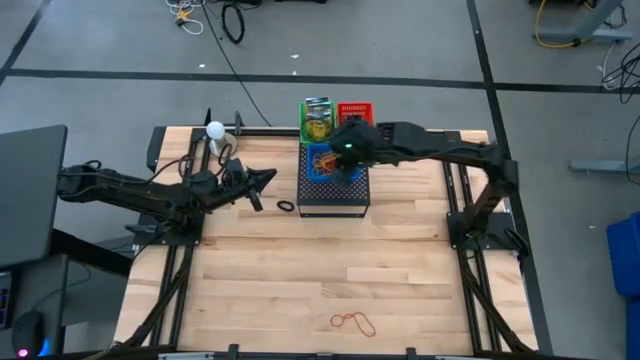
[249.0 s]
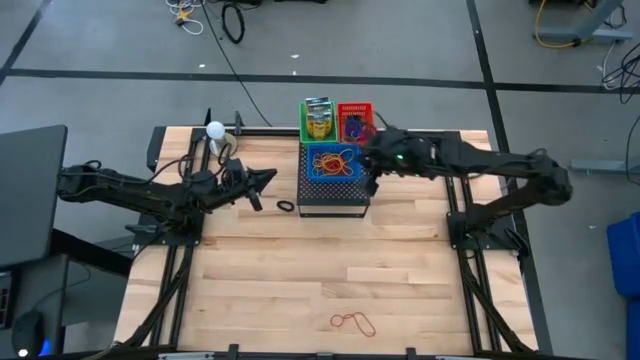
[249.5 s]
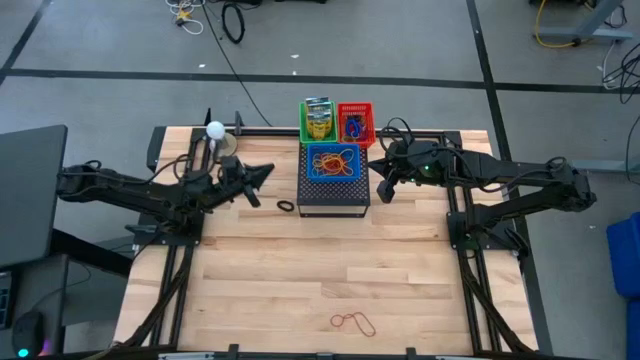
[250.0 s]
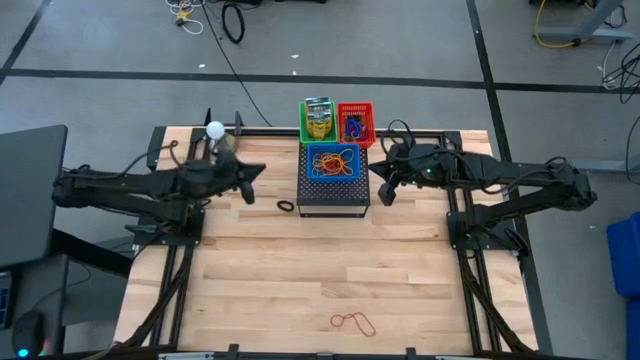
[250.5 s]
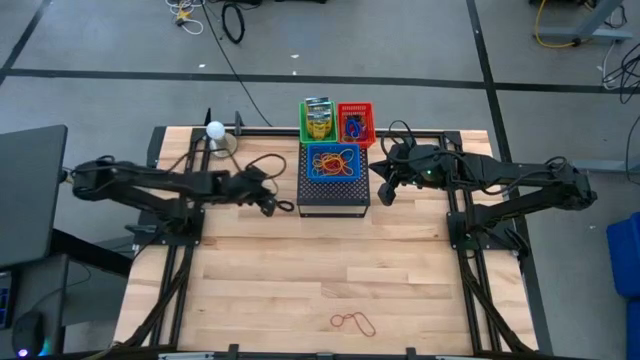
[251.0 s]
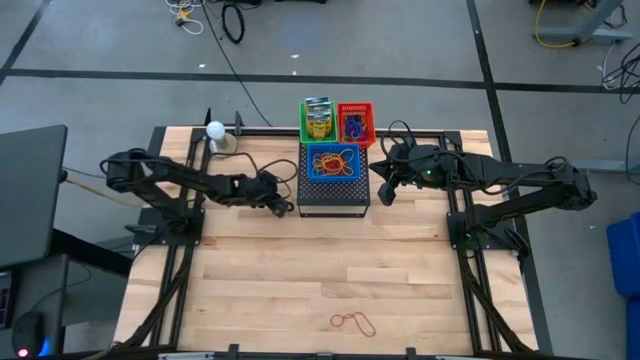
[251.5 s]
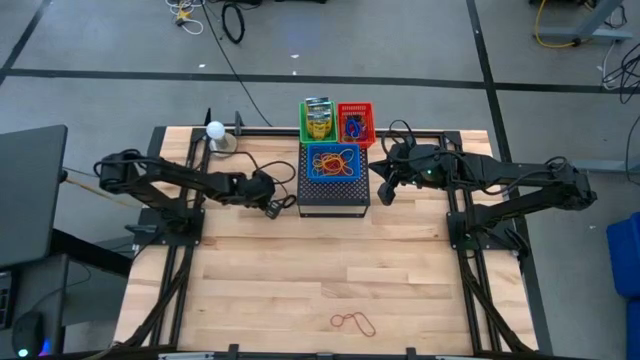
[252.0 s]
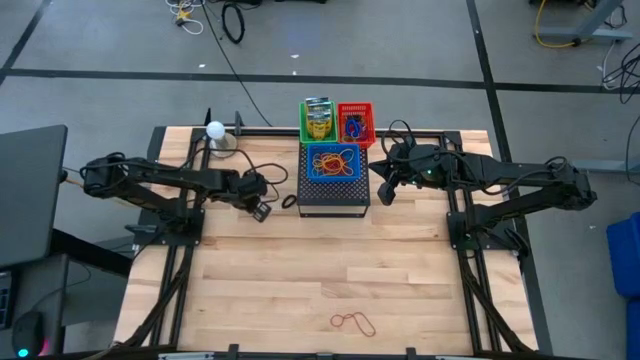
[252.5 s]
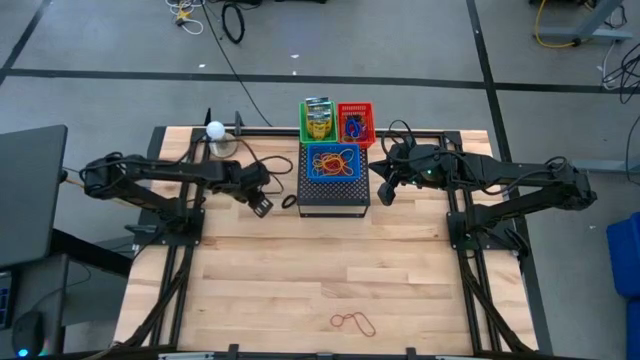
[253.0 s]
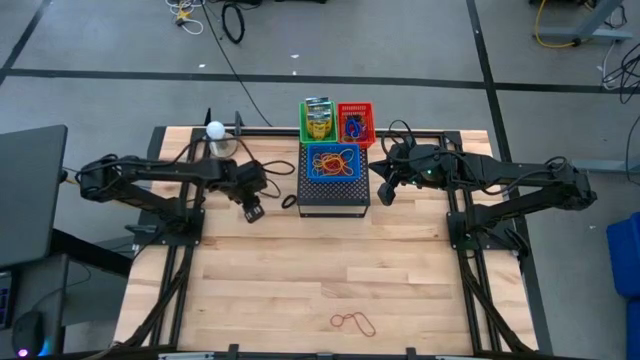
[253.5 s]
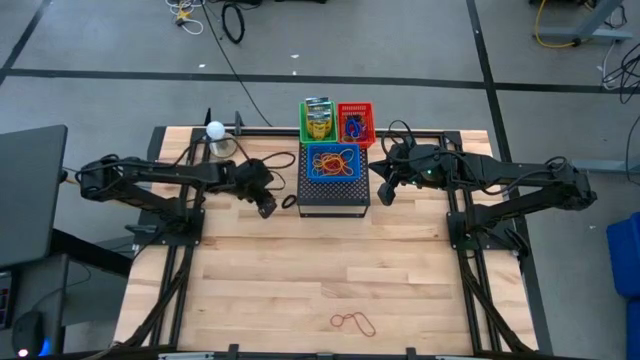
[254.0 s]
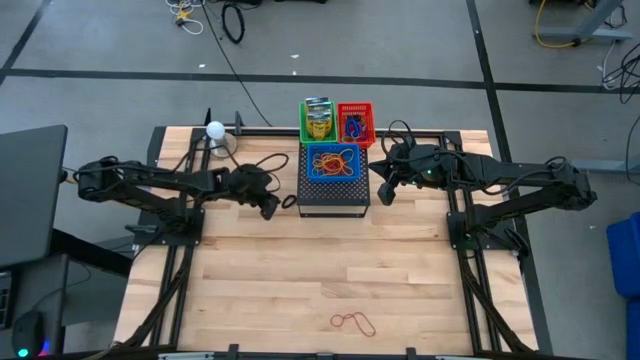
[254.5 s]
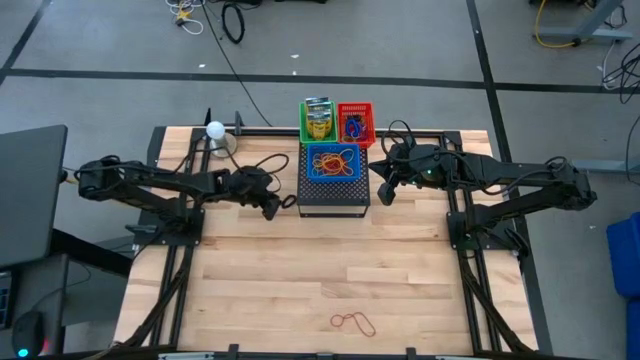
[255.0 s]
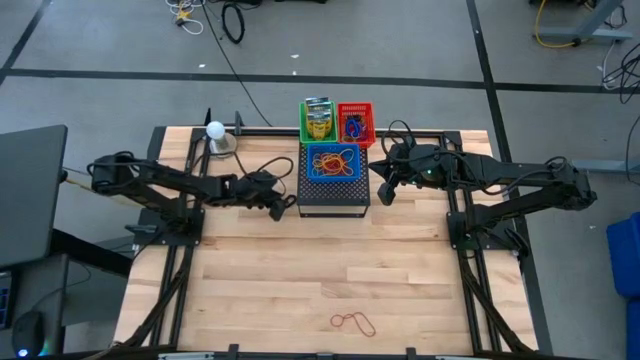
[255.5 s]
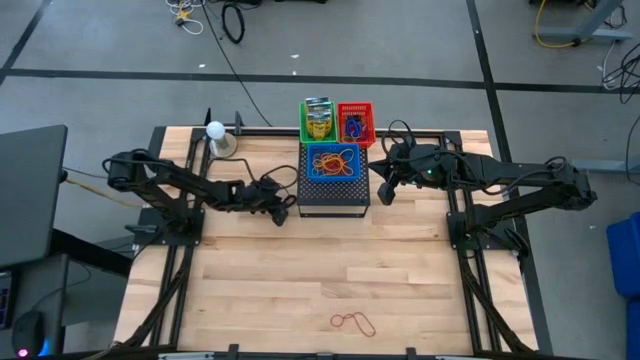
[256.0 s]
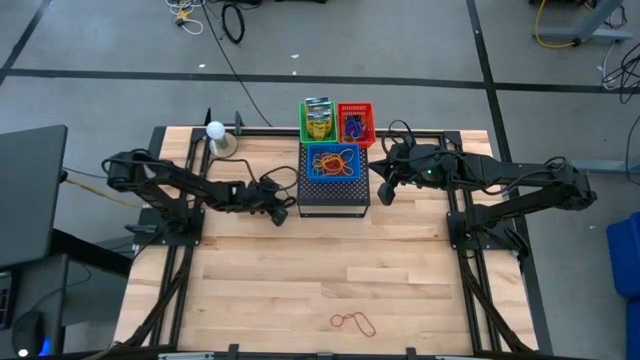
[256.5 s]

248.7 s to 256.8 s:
Task: Pick & Place Office Desk Supplies
Put the black spring keychain into the red bin on the shelf

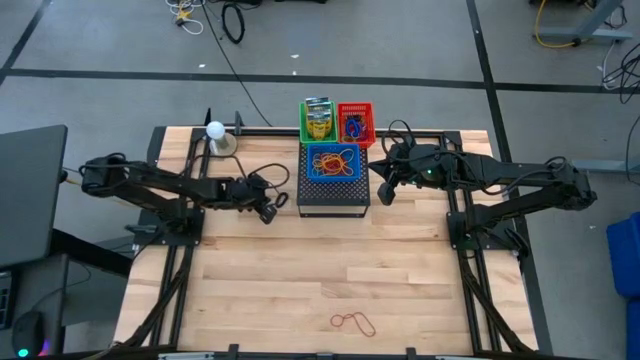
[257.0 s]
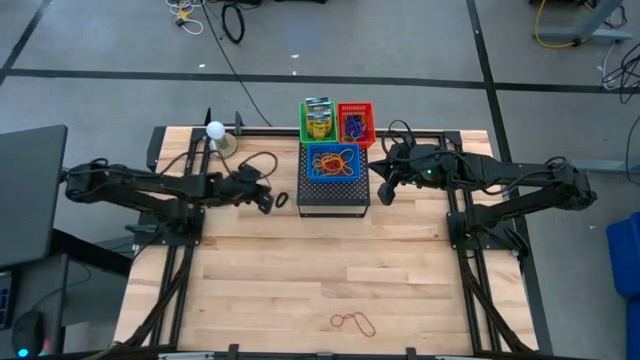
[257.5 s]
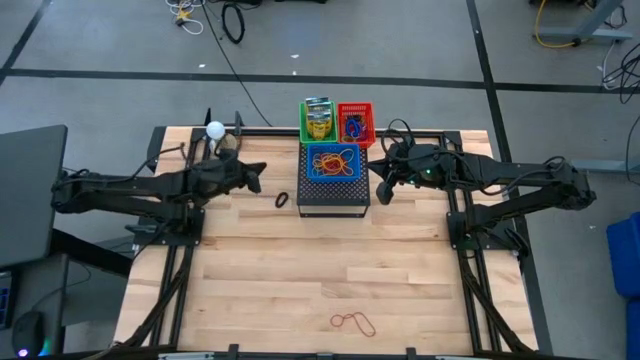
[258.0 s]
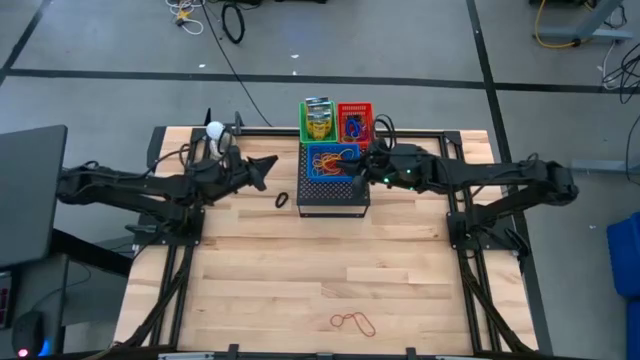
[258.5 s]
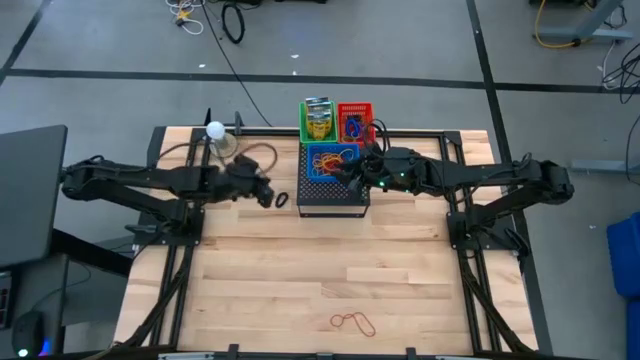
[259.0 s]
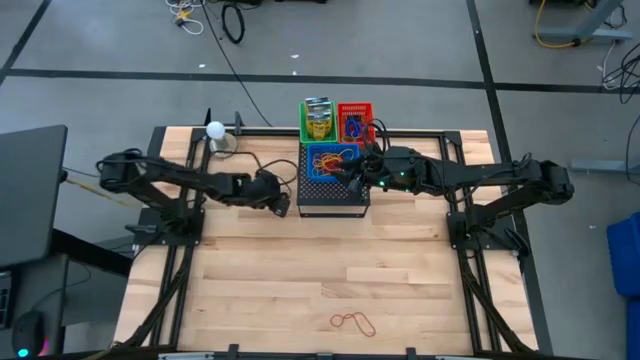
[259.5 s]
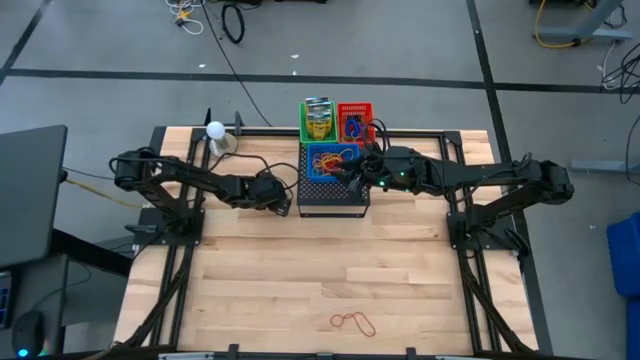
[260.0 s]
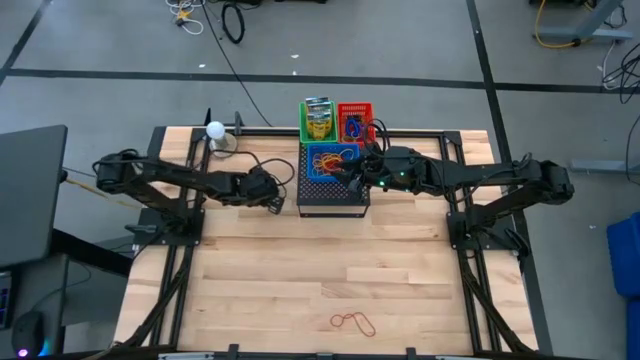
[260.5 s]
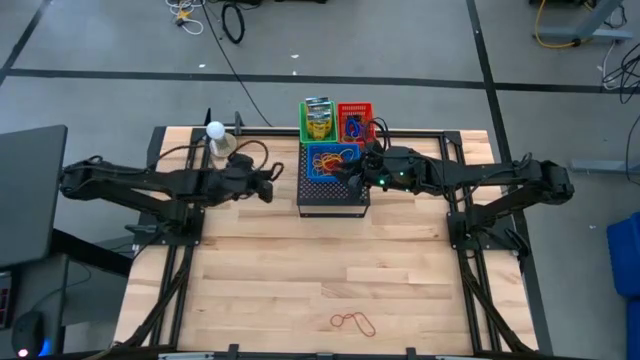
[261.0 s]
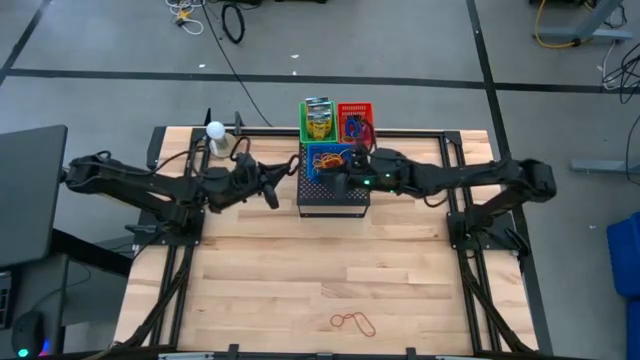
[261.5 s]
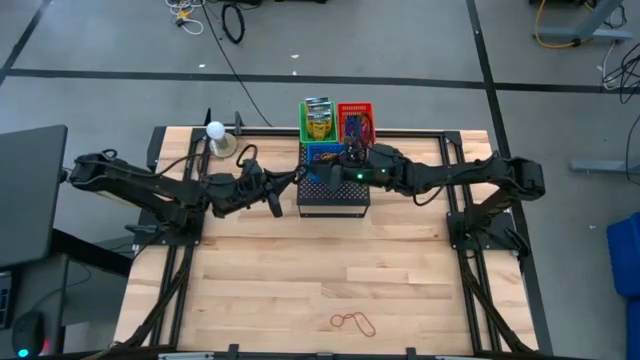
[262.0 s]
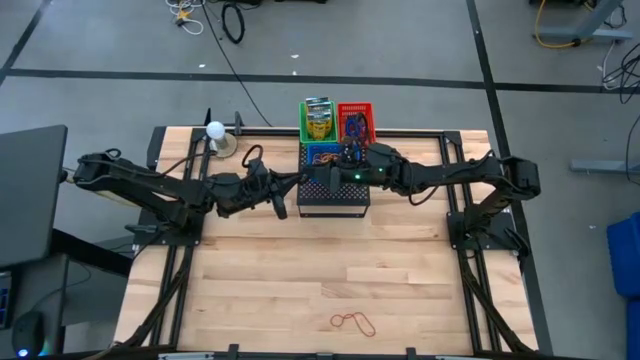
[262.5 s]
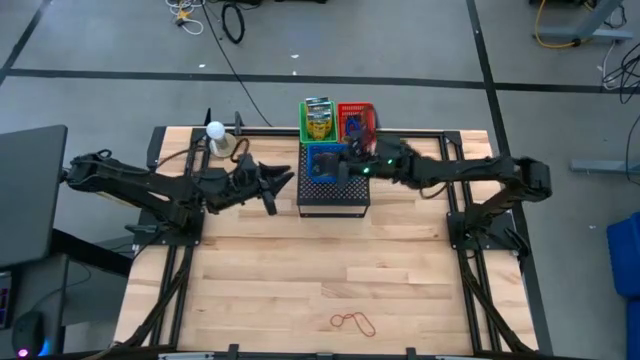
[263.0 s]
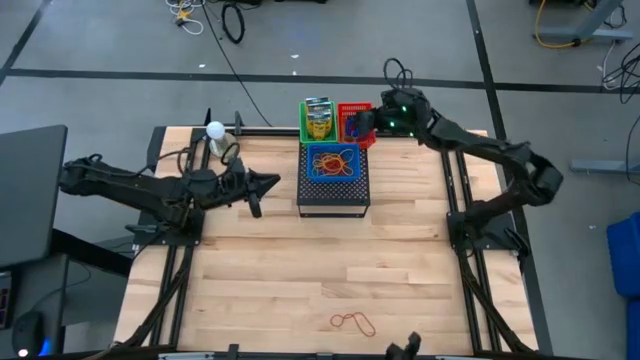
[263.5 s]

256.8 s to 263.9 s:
Put the black spring keychain into the red bin on the shelf

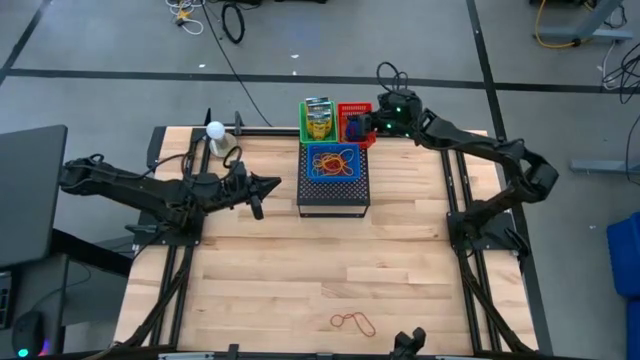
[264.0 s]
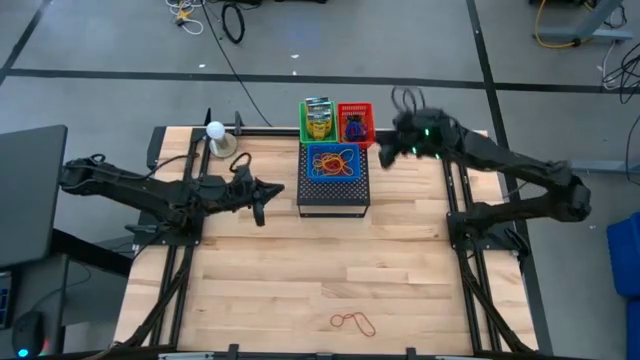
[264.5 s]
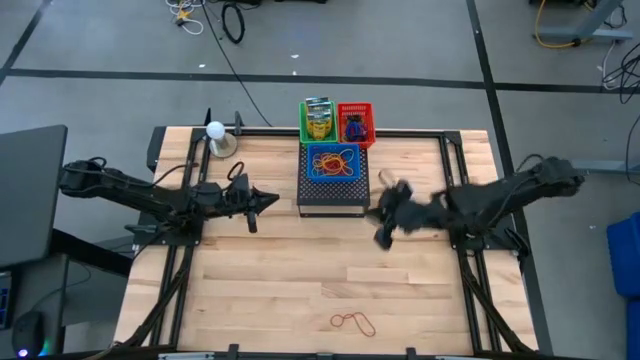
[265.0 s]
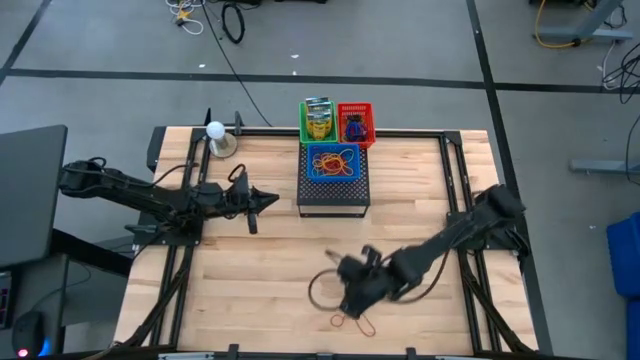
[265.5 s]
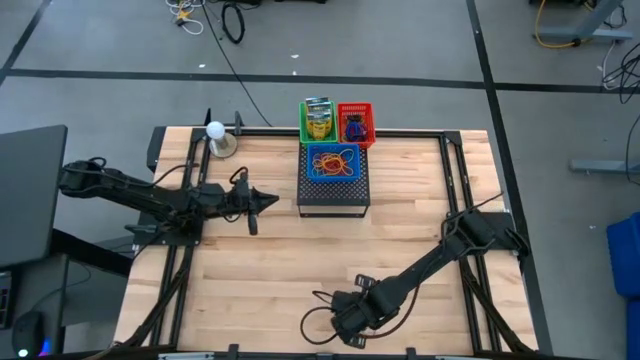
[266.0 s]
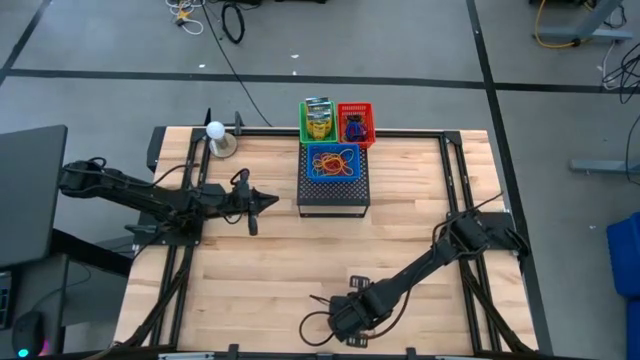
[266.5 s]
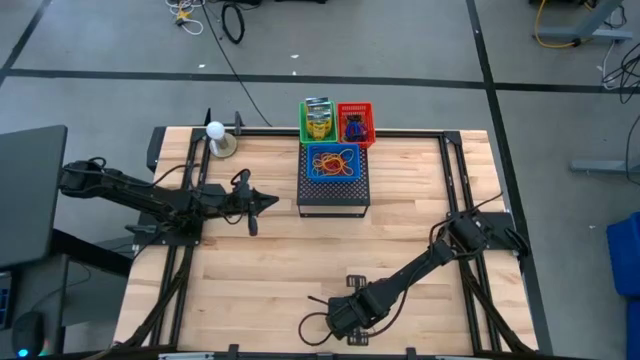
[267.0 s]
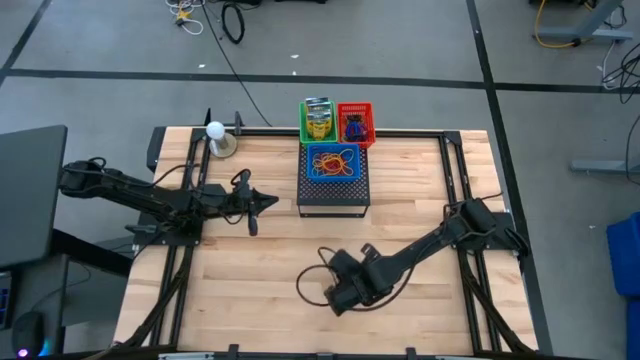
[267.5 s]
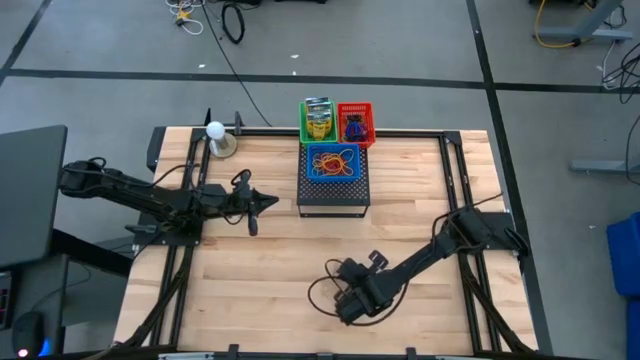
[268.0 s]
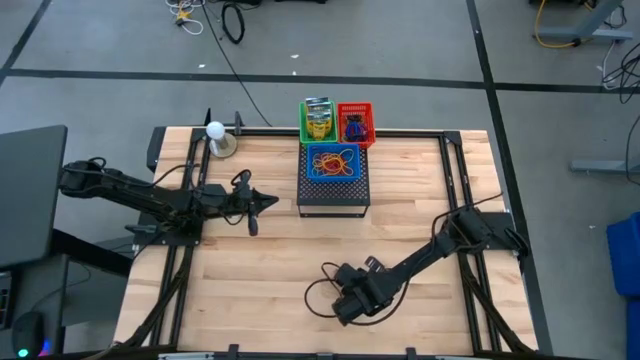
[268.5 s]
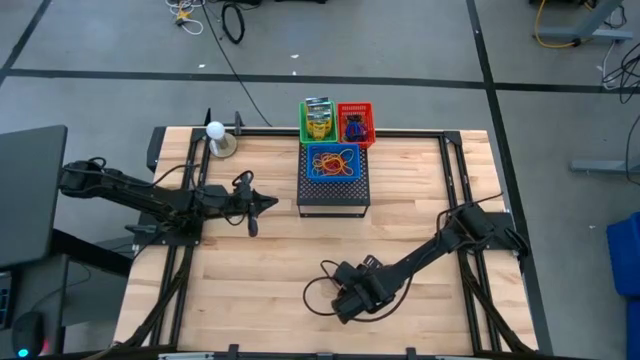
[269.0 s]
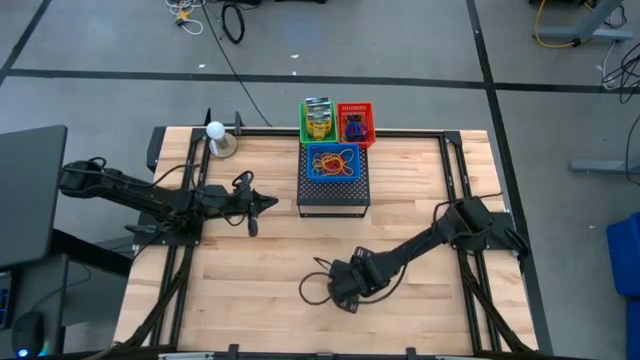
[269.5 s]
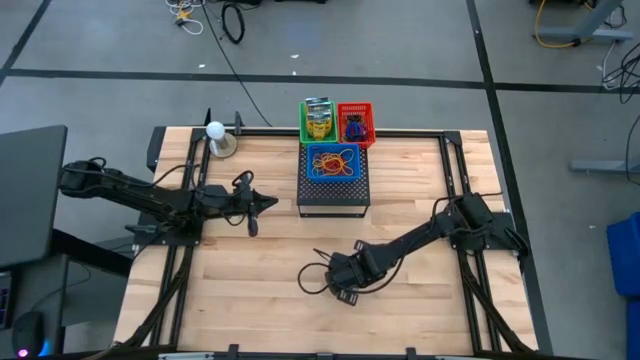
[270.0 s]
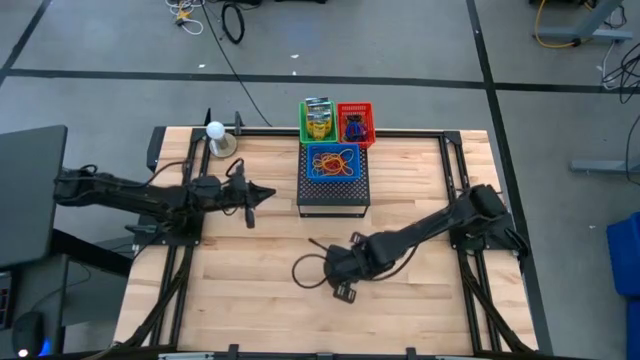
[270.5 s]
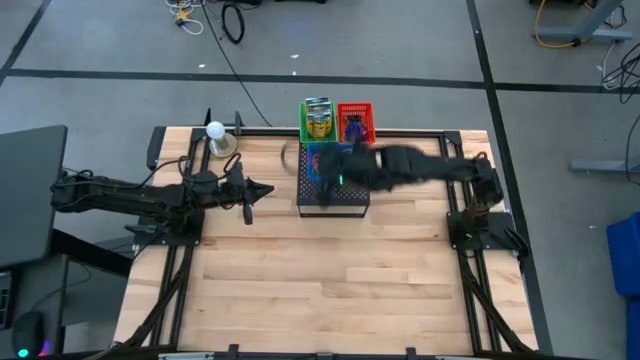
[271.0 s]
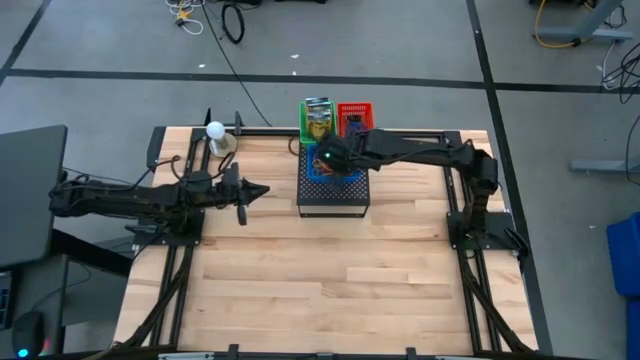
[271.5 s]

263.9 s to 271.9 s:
Put the red rubber band into the blue bin on the shelf
